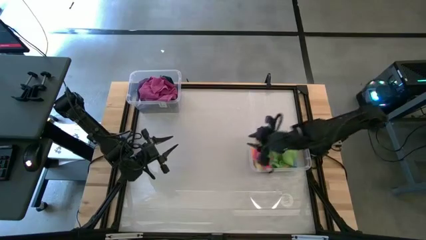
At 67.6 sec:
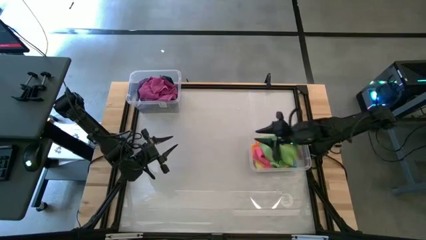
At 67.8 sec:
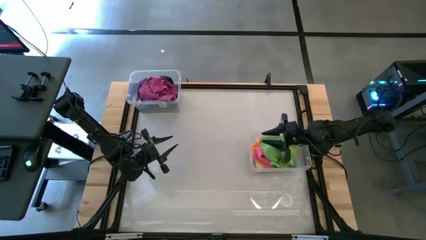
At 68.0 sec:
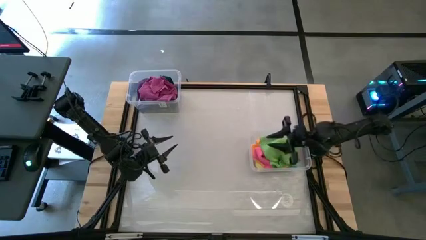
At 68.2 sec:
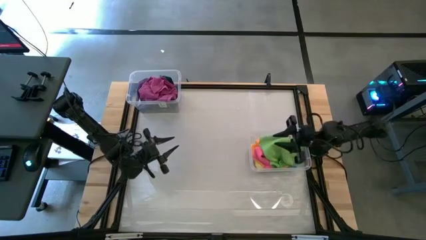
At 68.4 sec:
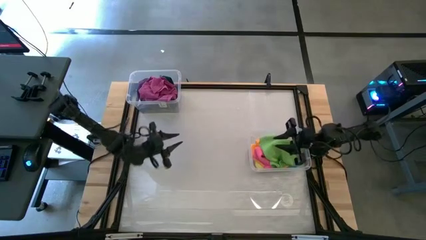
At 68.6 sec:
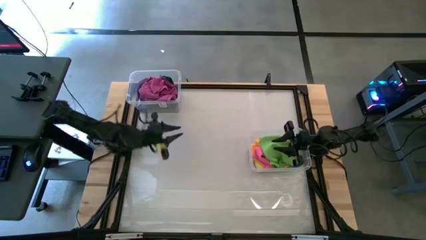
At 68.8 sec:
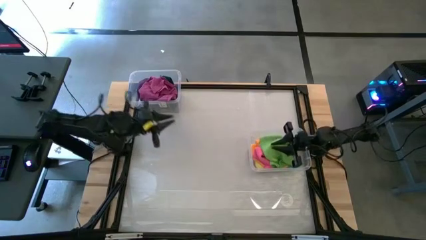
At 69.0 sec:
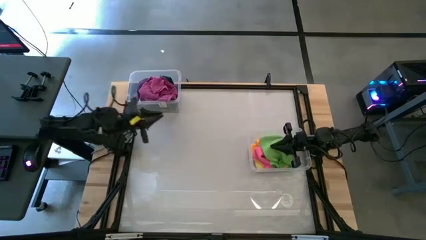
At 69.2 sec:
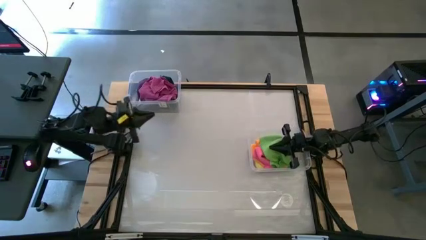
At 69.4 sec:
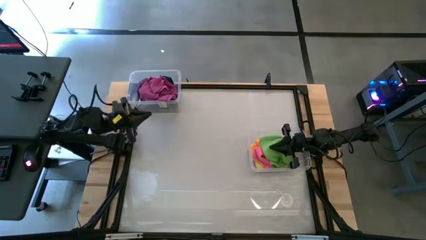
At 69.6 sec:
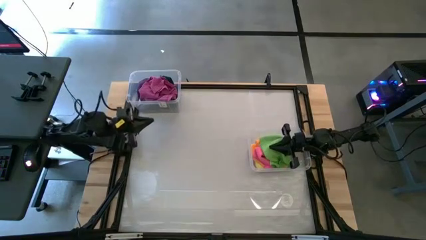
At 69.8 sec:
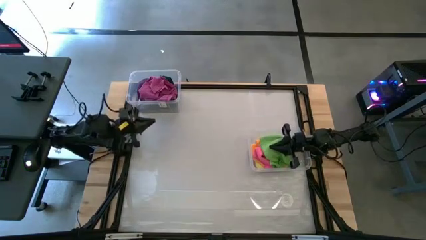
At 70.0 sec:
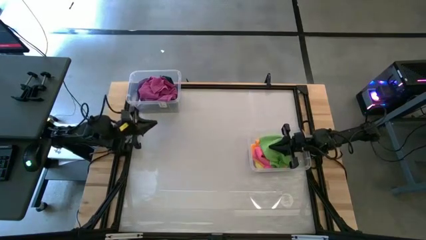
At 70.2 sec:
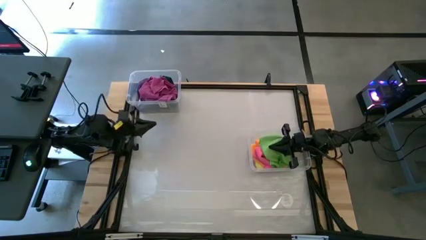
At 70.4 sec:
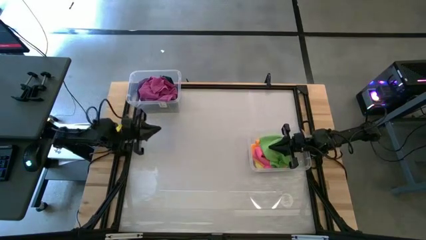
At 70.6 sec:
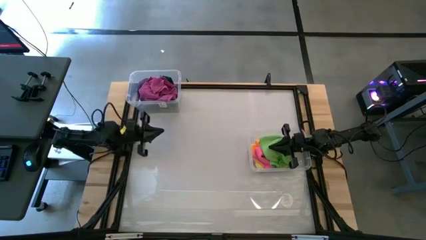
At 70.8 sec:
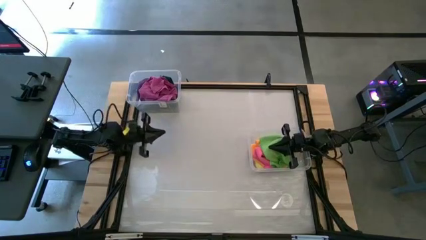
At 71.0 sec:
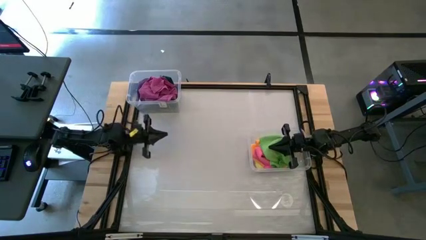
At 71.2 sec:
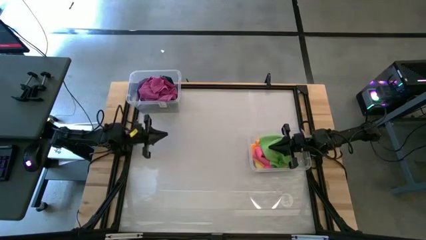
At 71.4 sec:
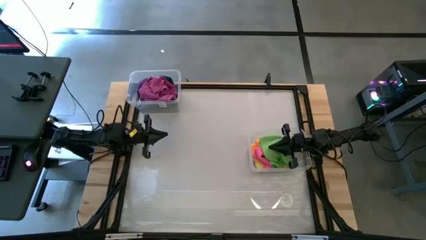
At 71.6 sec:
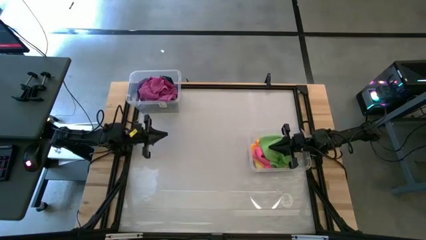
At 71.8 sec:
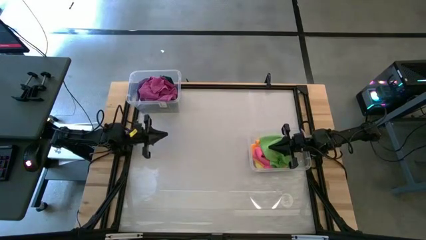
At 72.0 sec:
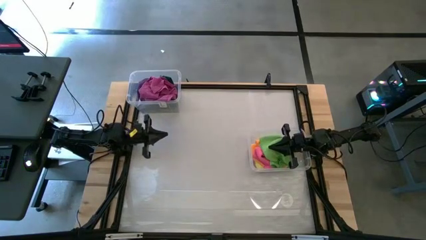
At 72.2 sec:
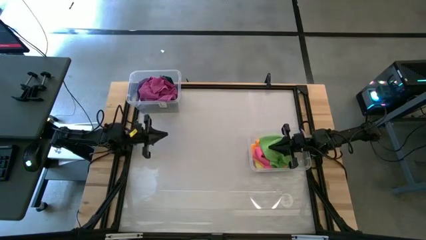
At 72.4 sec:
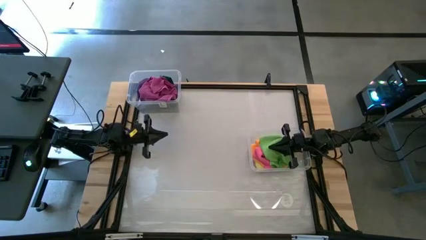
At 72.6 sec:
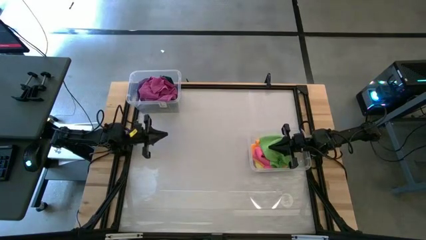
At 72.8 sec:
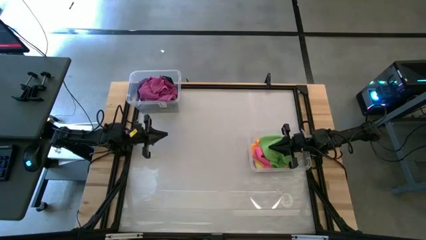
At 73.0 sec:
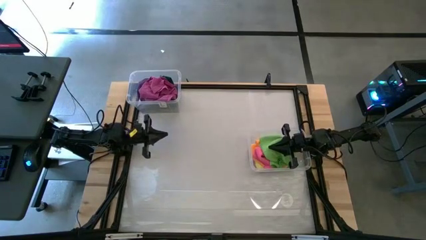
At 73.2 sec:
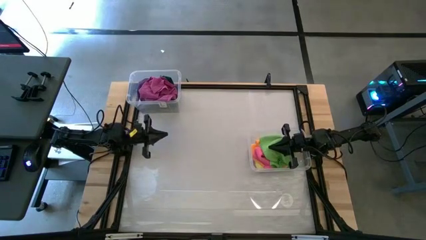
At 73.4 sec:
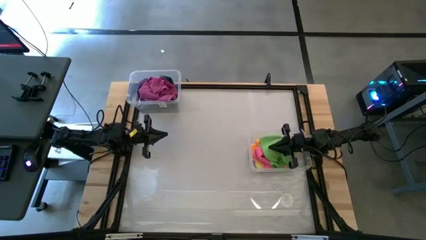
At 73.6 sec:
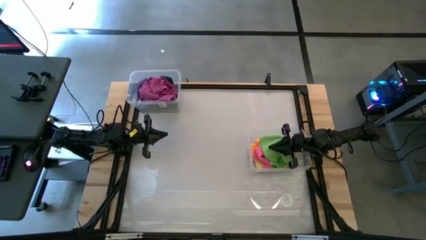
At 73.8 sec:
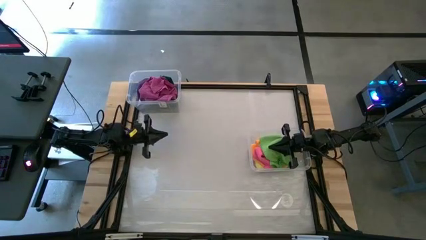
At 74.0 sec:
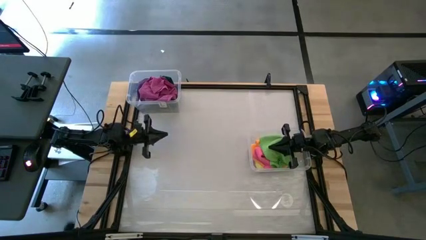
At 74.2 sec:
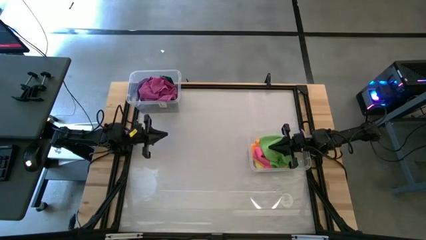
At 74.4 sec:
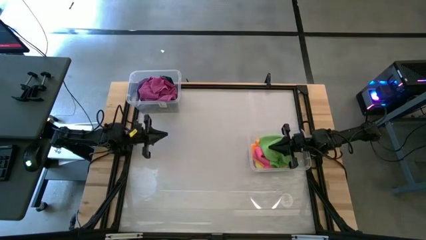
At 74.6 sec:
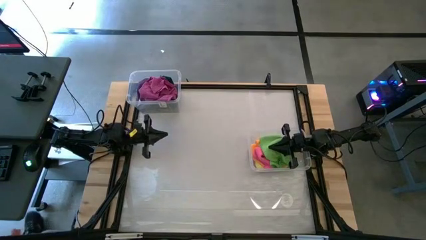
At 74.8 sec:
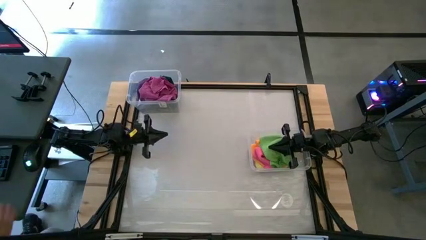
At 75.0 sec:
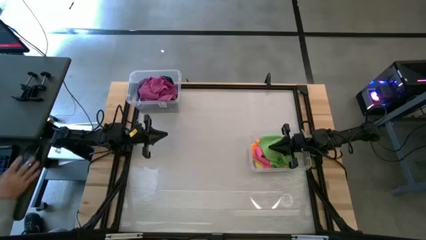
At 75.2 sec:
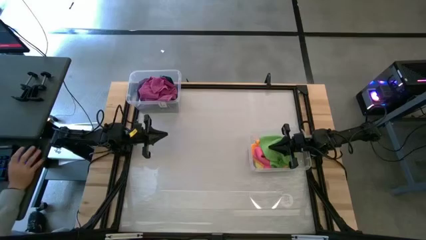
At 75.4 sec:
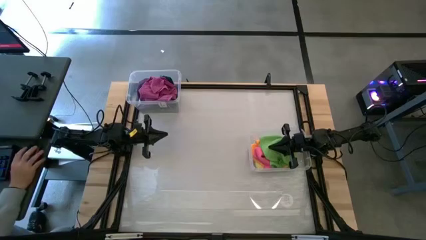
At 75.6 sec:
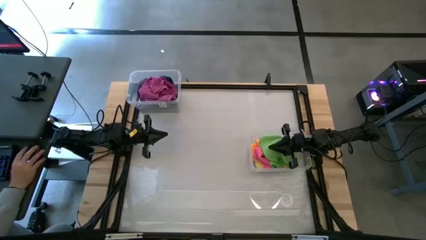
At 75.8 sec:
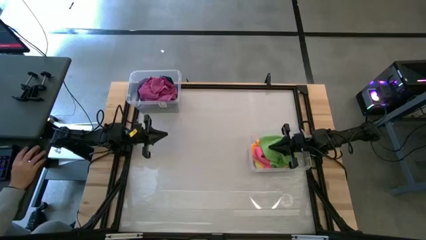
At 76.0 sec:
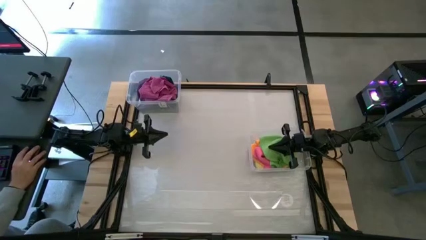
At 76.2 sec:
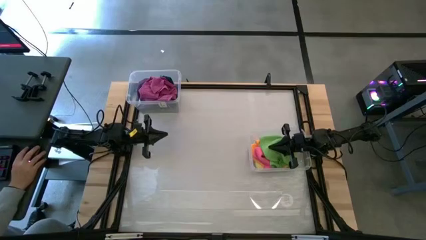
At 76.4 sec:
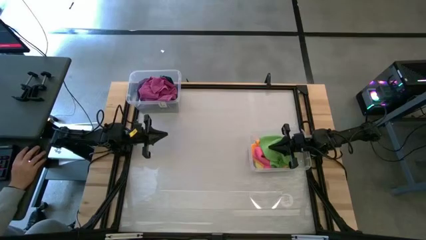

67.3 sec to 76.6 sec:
Task: Sort towels by color in basket
Return to Home Position

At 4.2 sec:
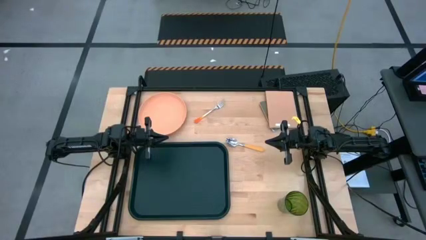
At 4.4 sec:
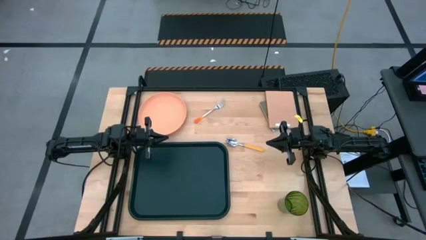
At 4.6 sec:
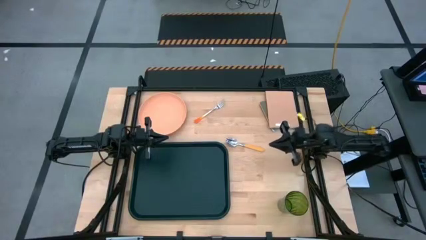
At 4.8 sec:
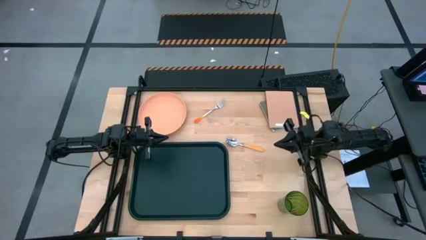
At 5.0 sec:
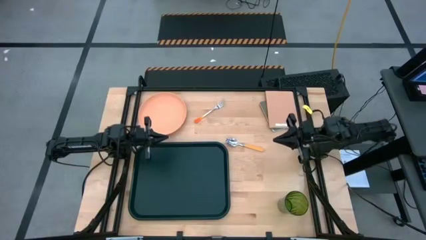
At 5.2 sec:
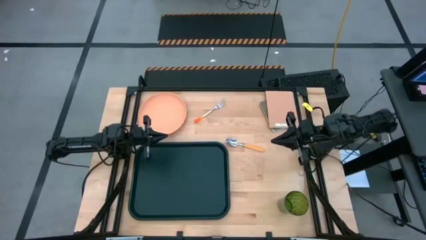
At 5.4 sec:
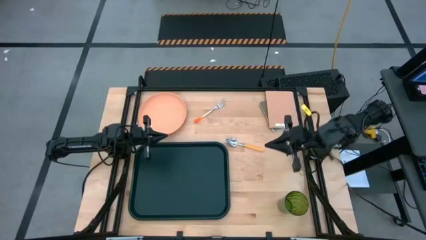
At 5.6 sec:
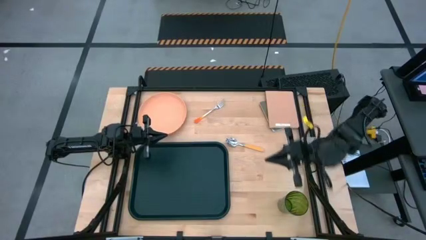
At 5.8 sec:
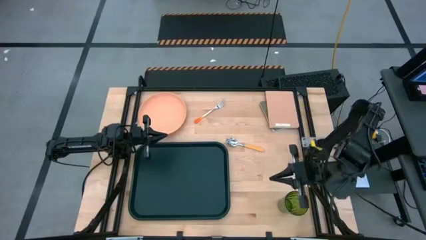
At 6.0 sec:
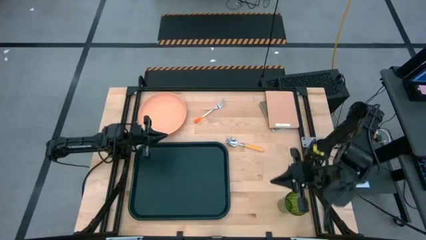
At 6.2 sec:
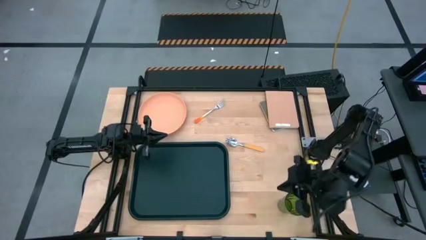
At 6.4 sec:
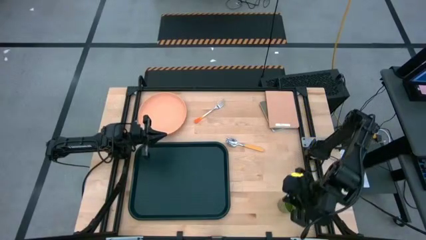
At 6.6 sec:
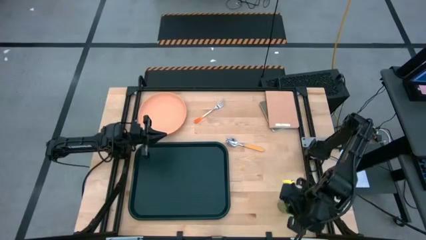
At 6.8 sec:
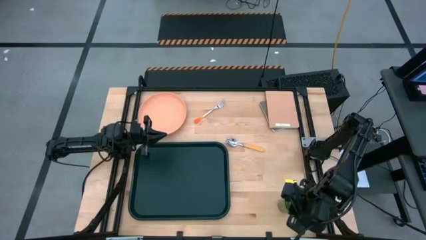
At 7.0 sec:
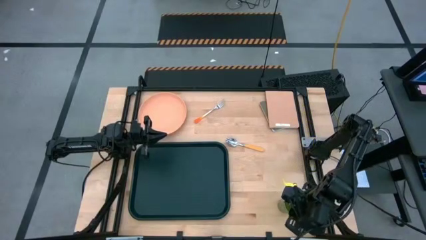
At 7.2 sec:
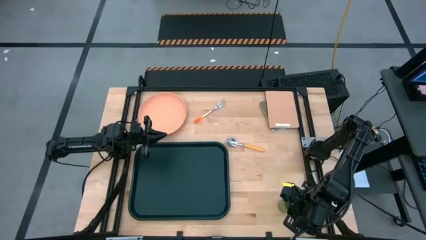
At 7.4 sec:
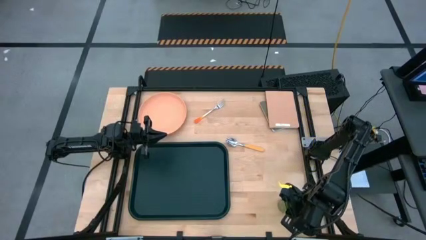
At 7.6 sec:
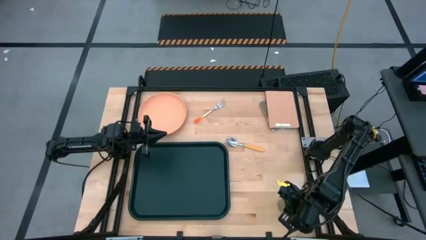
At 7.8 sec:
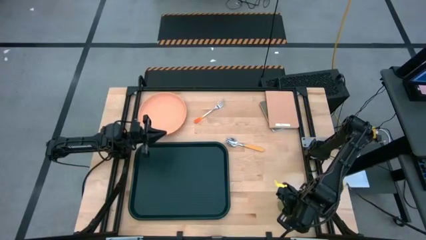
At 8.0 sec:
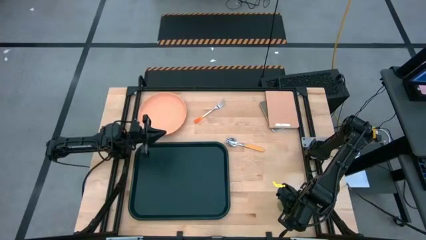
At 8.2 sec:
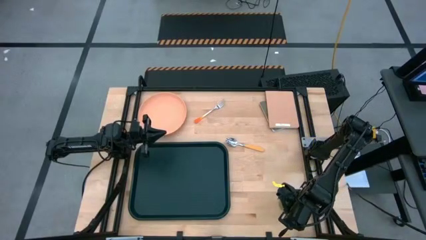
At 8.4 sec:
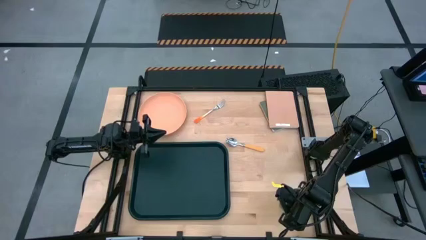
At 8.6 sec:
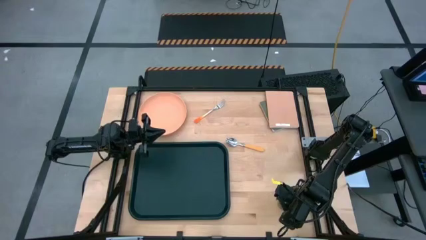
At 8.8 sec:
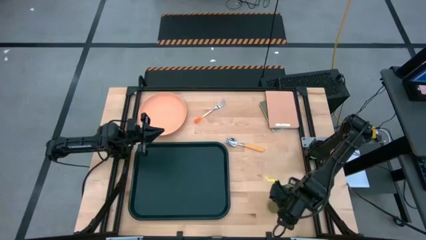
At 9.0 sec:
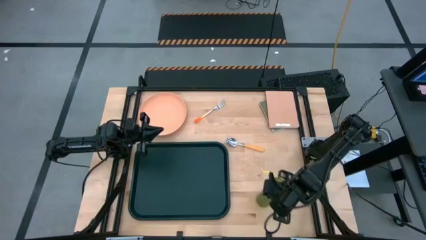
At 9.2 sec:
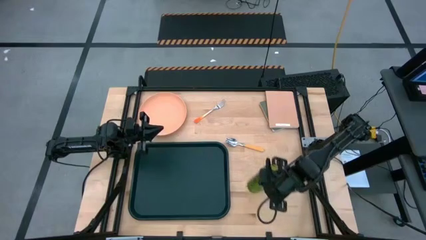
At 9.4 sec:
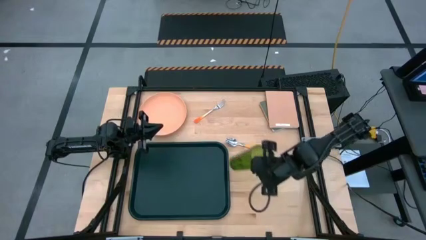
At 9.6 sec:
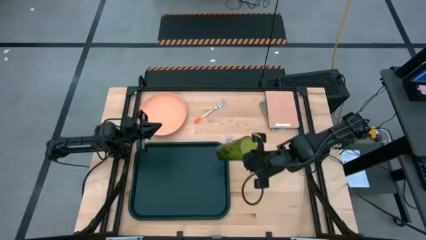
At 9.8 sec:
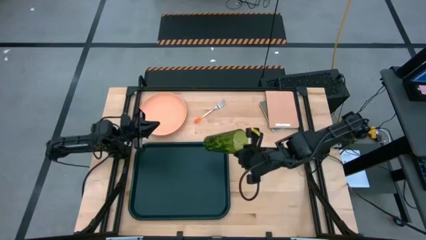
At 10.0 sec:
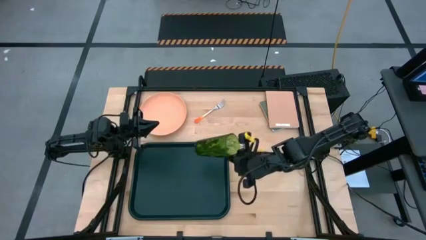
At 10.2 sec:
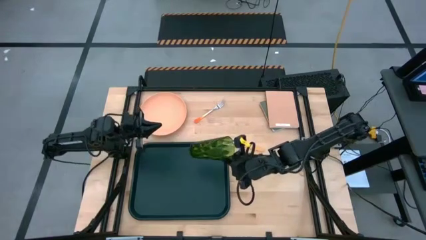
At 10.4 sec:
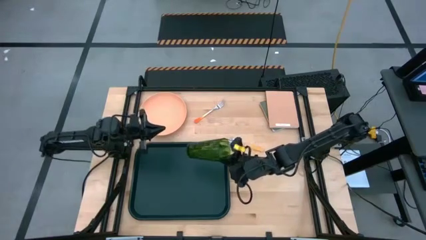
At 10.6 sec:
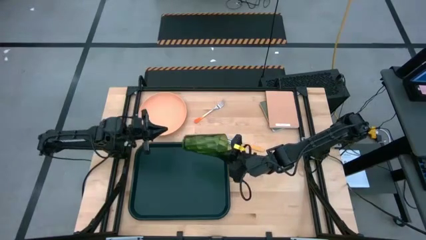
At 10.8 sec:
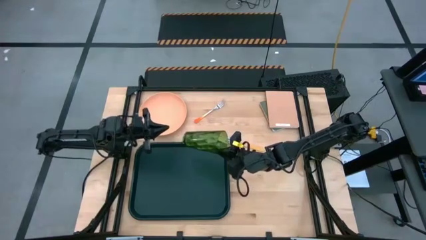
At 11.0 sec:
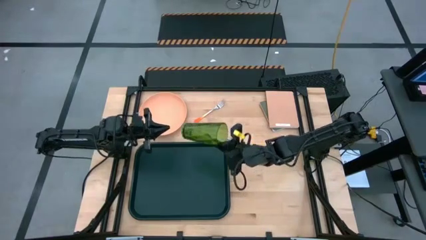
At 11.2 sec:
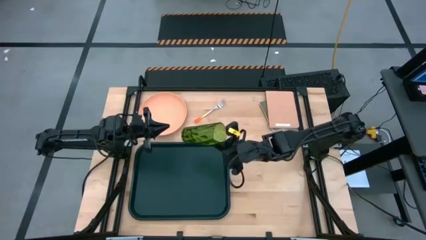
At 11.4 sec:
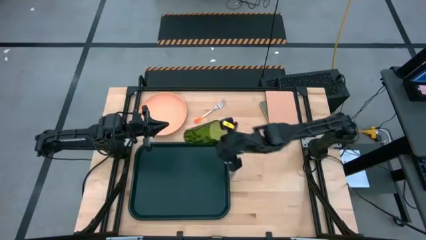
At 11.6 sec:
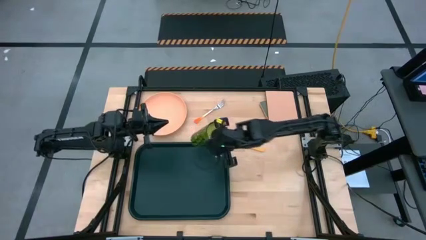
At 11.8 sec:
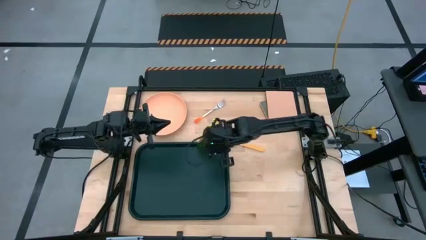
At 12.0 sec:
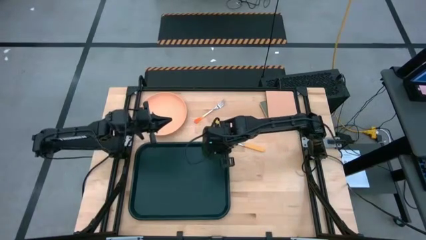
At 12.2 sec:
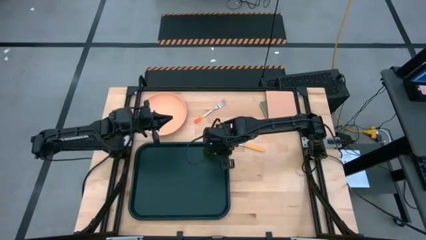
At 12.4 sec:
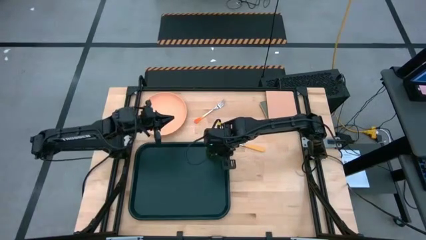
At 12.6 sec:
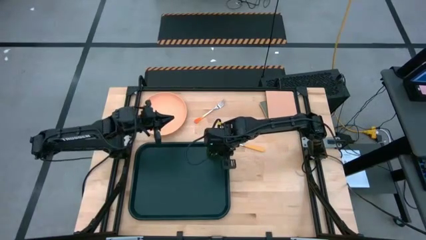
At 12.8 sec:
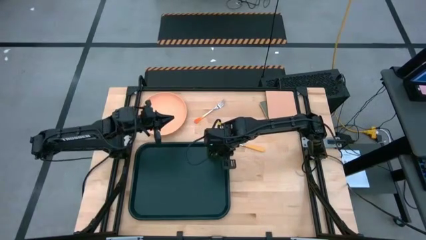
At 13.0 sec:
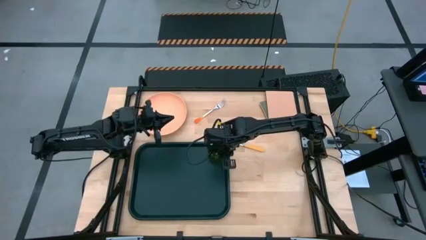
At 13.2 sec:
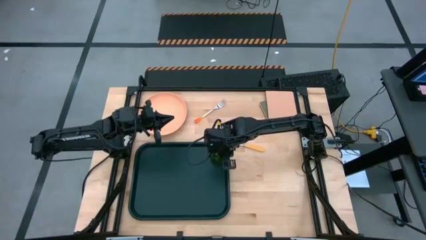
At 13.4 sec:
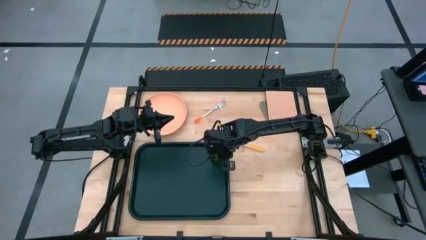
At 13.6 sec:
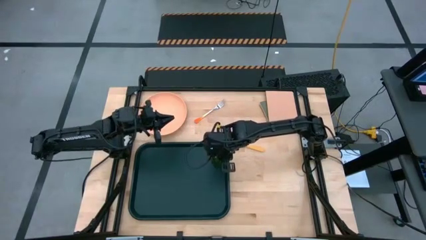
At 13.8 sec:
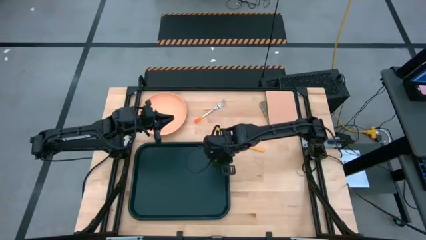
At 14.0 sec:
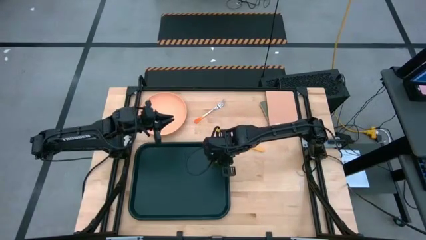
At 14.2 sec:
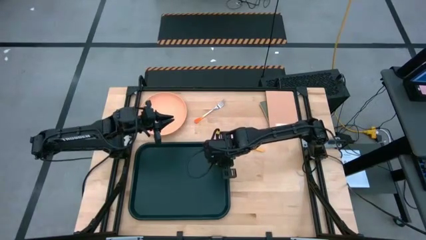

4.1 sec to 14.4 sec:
Task: Pick and place plate/cup/fork/spoon on tray
Put the green cup on the black serving tray
